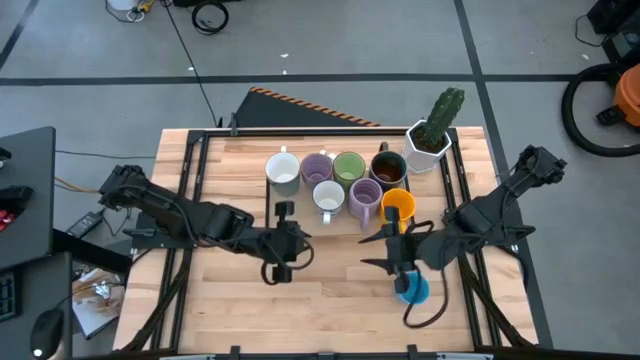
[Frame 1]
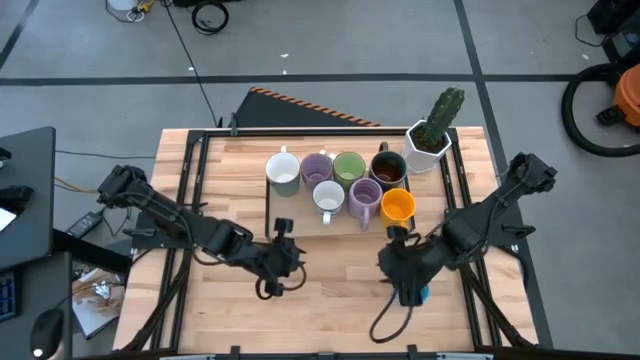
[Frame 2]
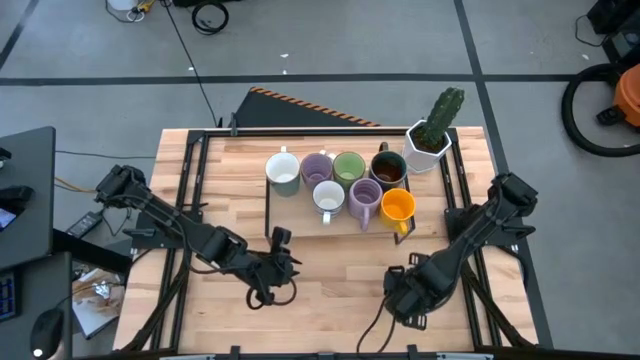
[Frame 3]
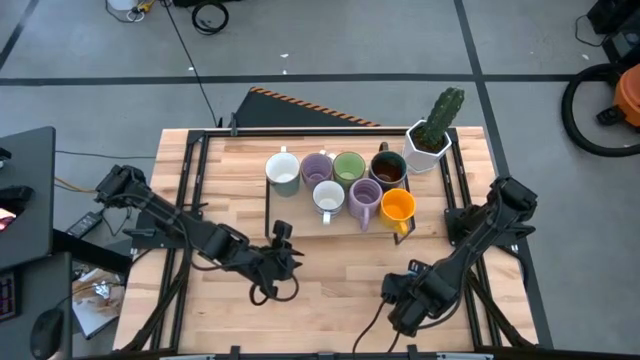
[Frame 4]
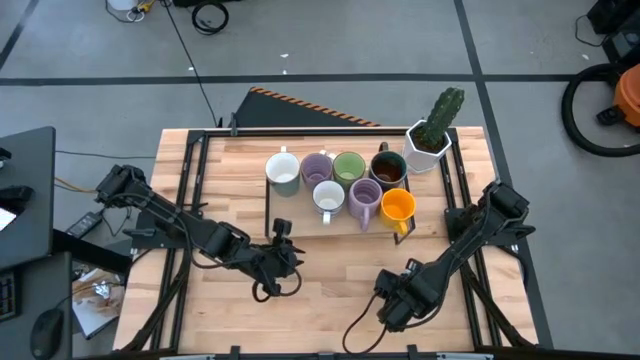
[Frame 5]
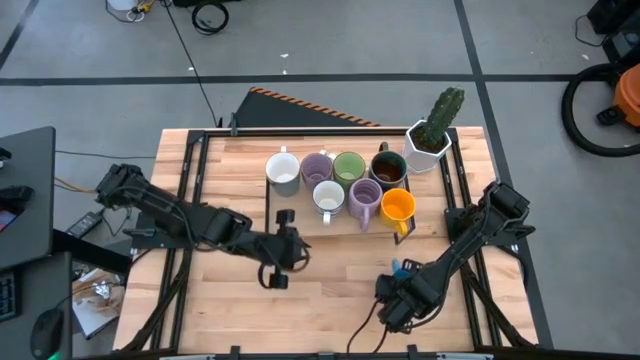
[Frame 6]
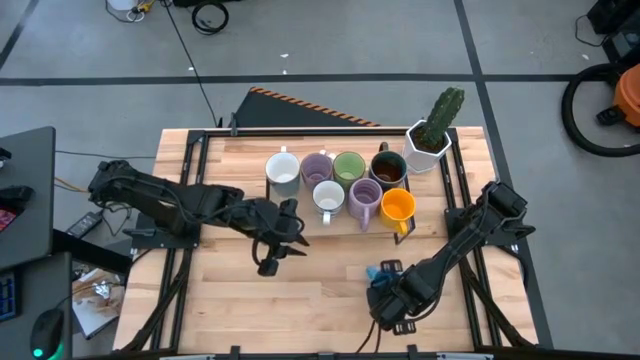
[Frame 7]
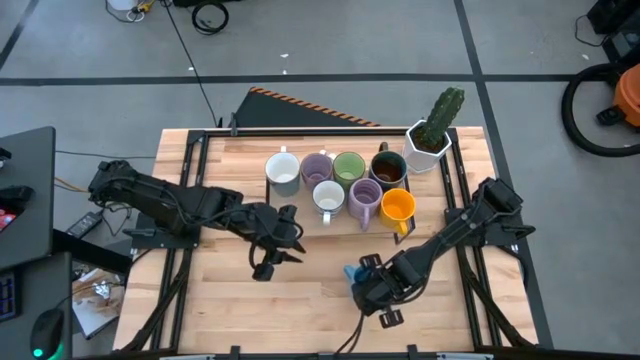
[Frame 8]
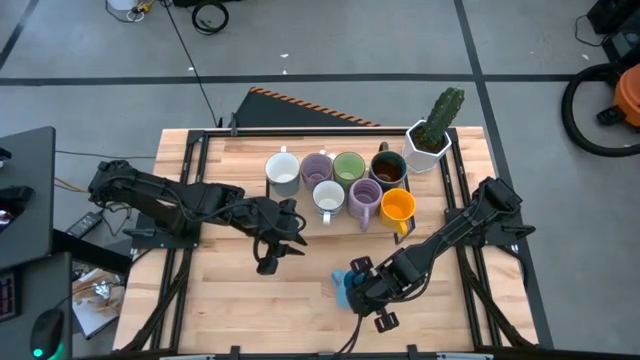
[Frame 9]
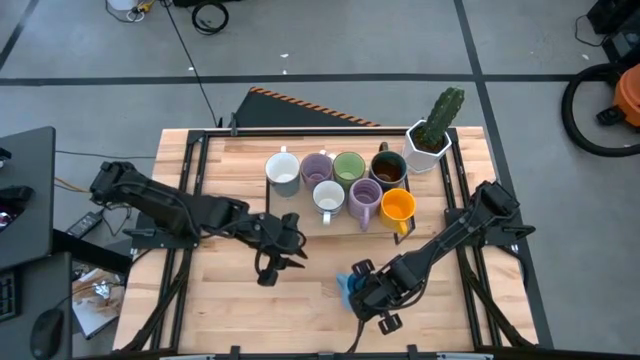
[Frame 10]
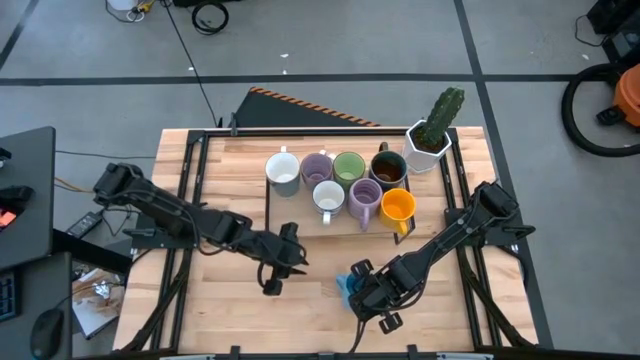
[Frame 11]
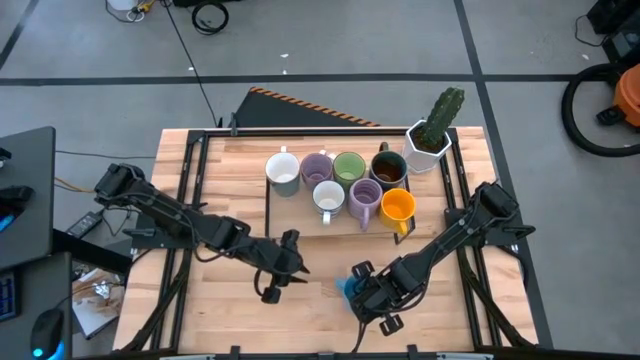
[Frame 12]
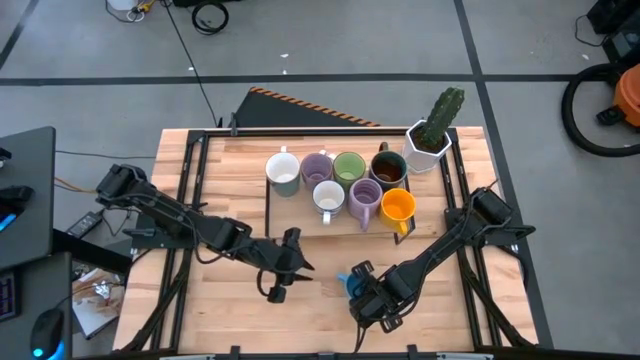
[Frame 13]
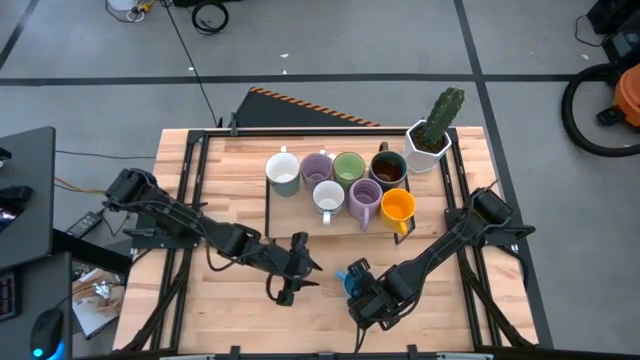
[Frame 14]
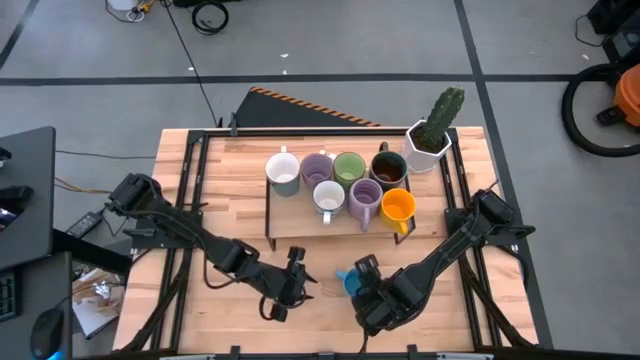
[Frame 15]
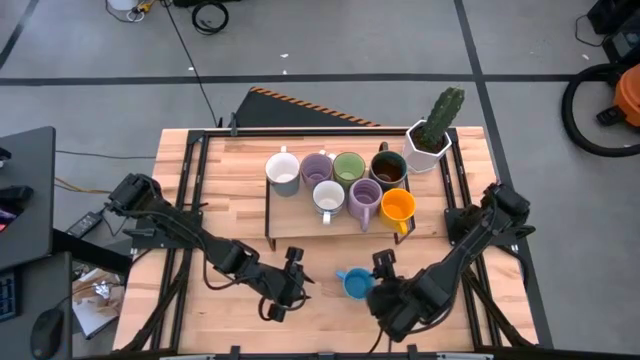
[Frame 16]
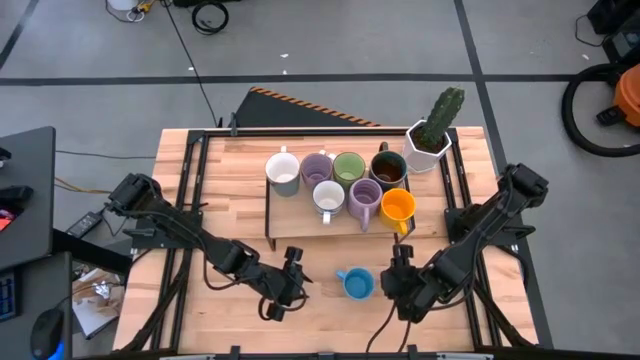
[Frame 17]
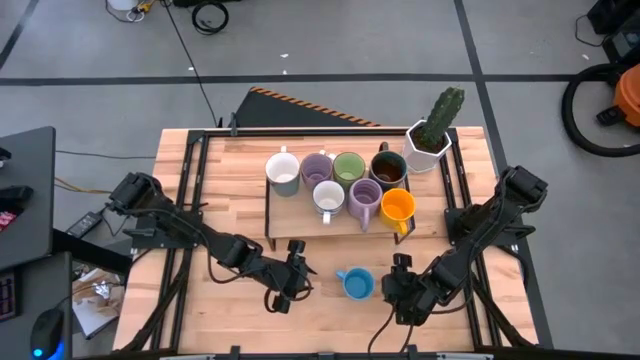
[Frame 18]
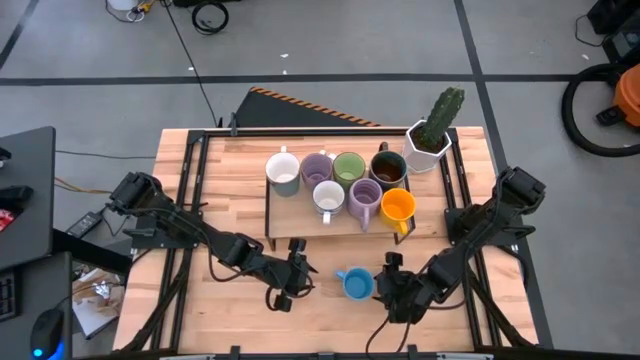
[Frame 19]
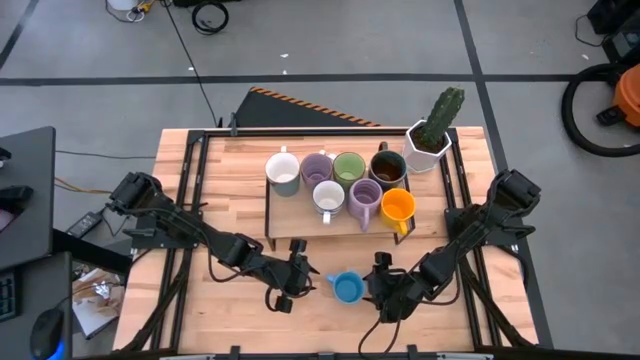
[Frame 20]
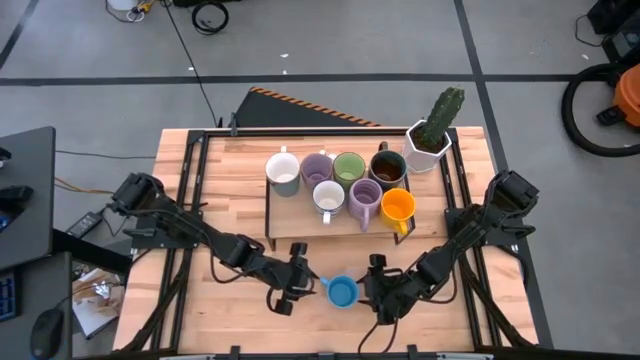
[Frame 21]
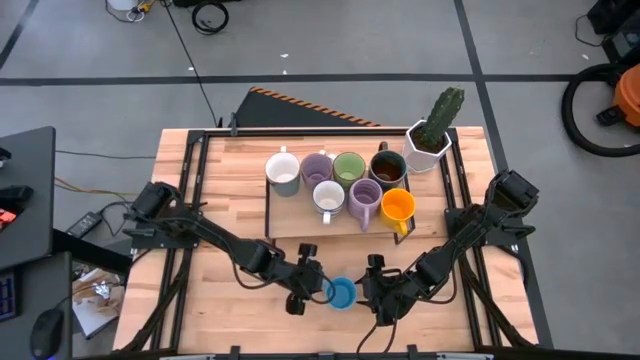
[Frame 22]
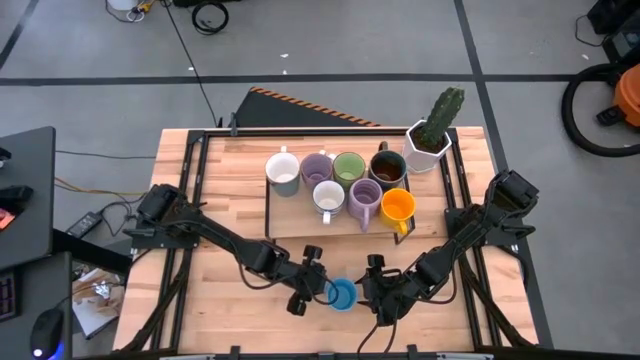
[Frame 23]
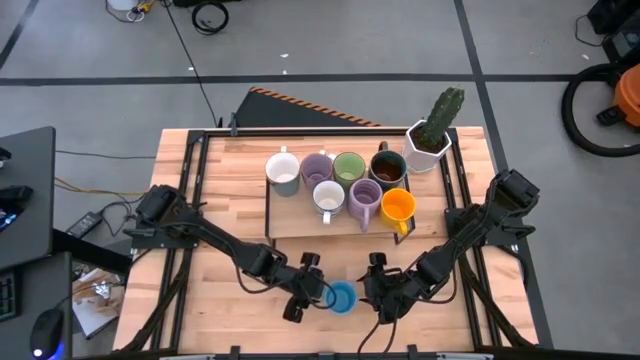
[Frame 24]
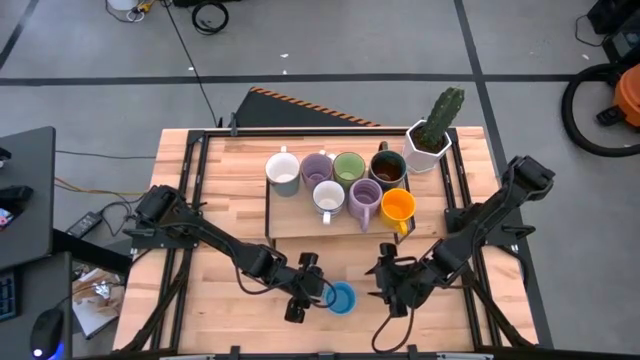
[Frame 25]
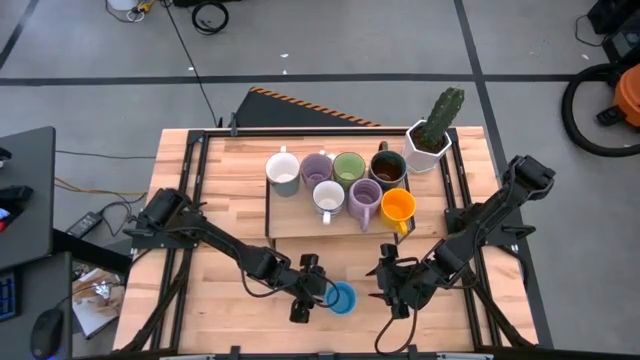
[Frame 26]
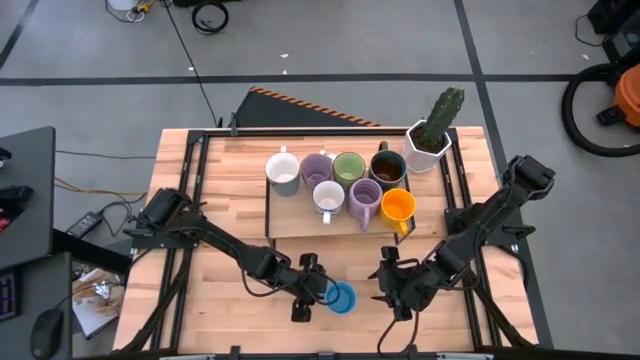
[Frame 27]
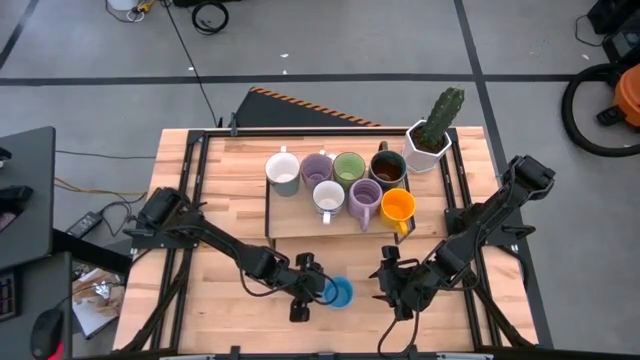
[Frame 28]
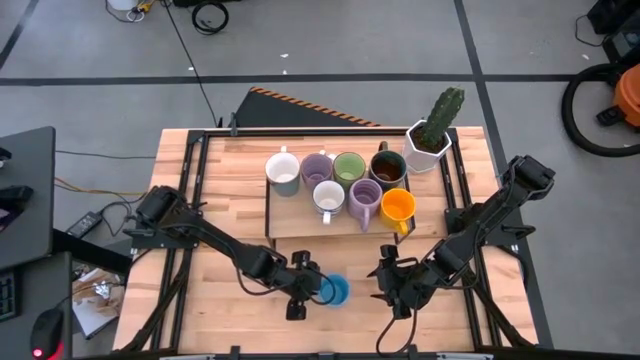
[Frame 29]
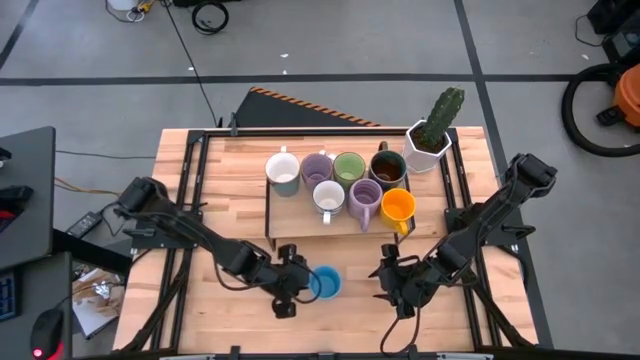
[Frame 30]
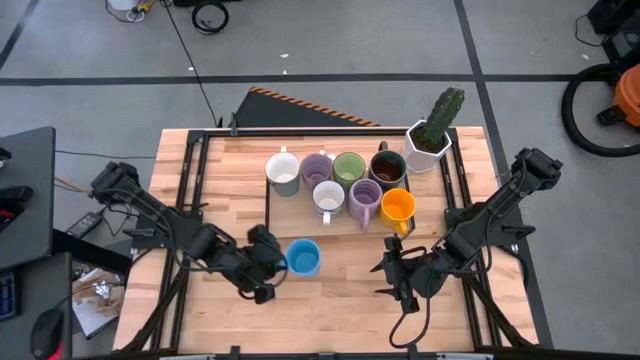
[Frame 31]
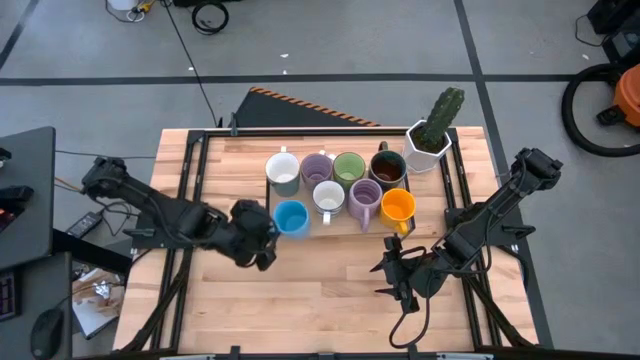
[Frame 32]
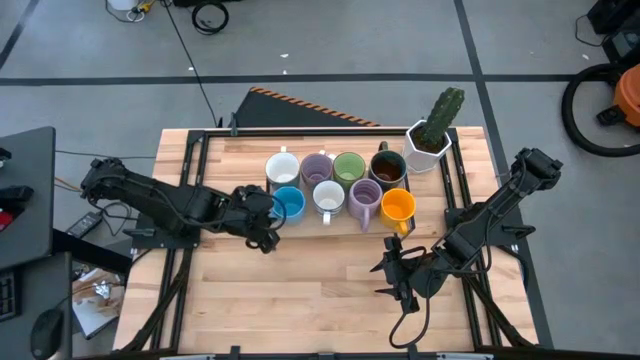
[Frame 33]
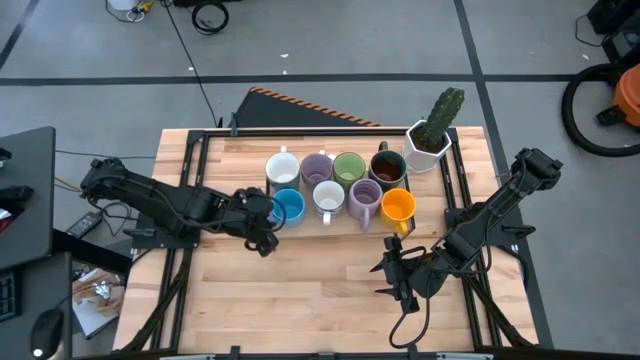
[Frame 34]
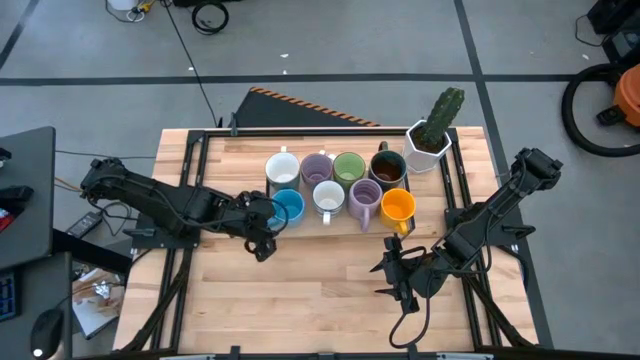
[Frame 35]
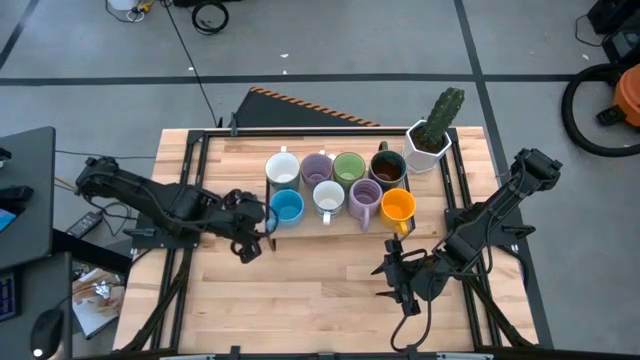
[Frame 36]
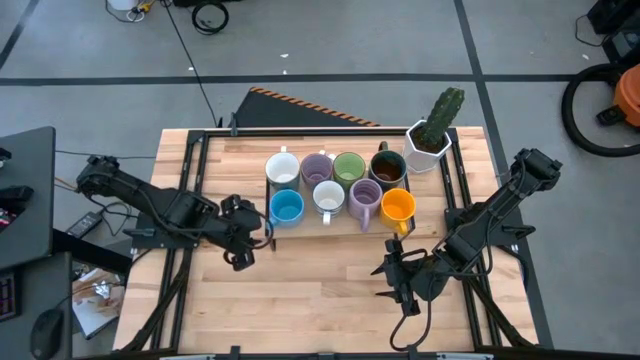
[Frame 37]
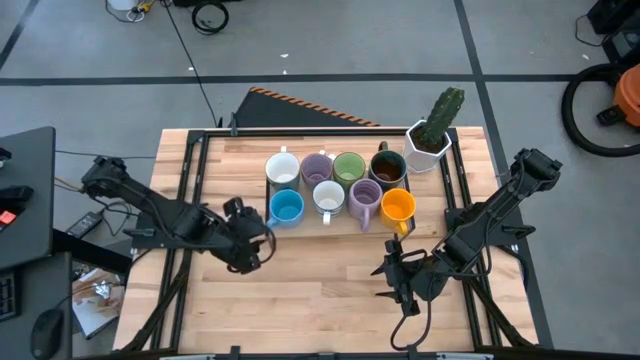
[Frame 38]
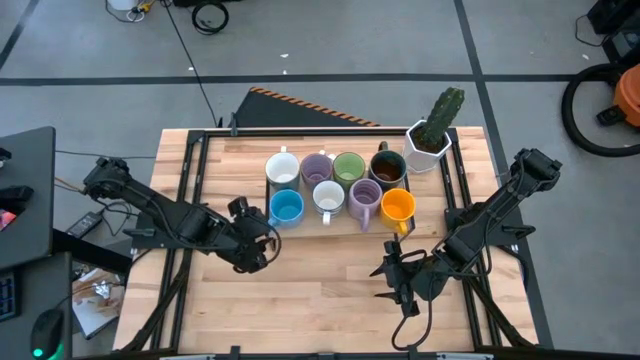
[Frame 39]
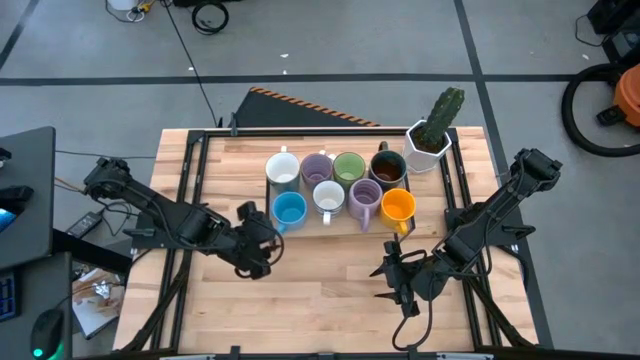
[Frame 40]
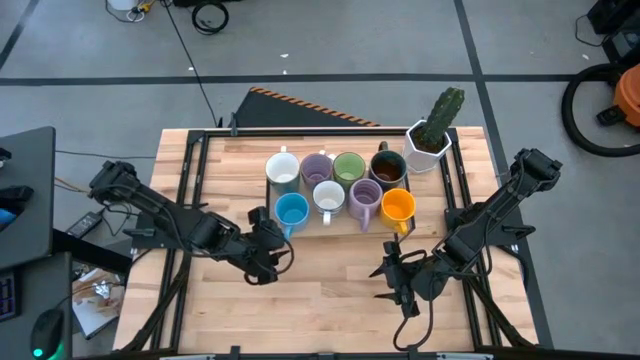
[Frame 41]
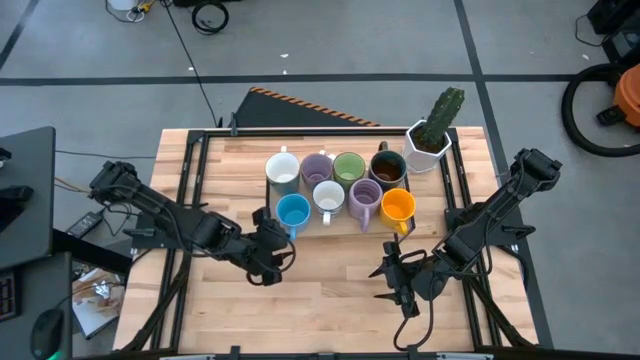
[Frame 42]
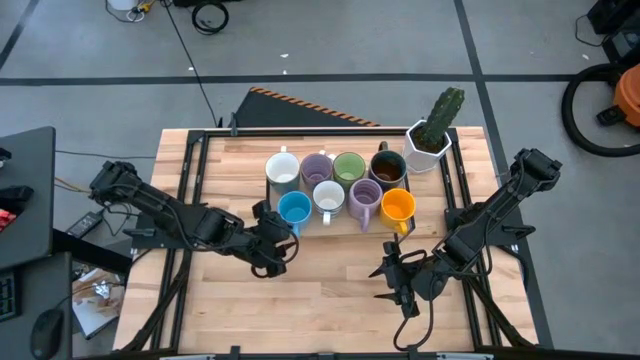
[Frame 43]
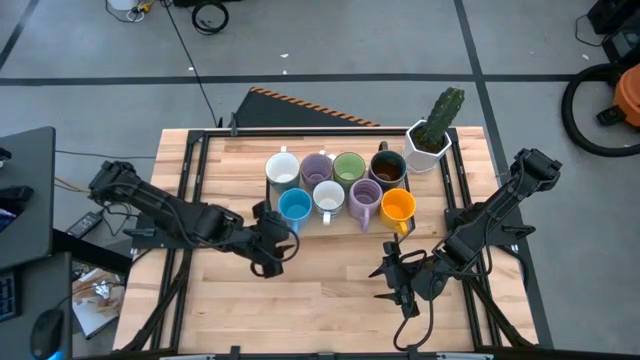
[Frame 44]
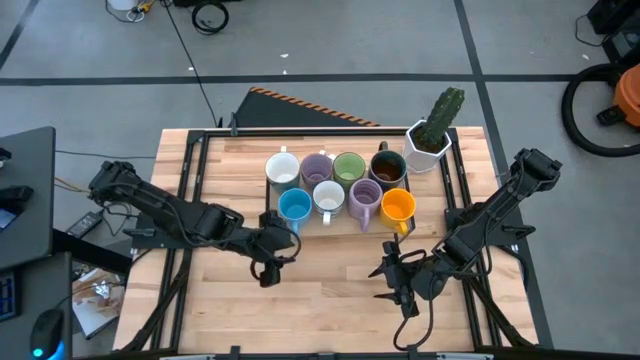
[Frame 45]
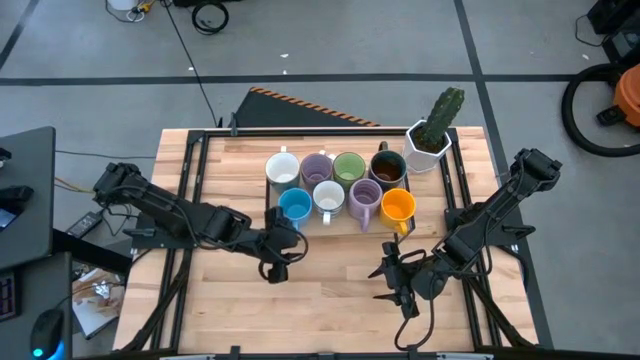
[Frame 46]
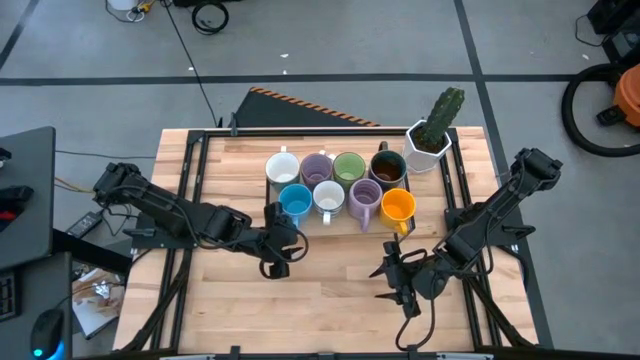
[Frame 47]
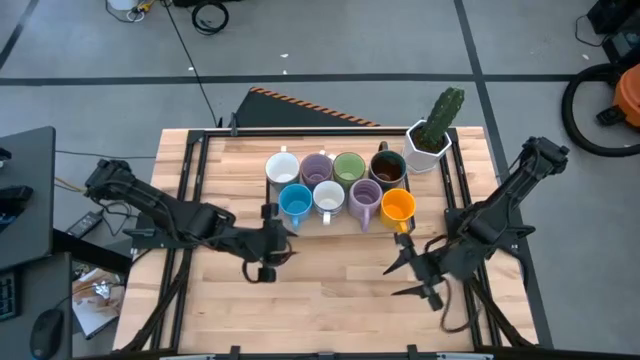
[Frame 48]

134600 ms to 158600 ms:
Task: Place coffee mugs
Put the blue mug on the shelf
